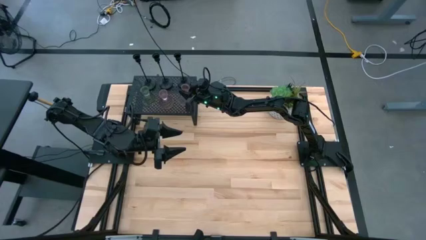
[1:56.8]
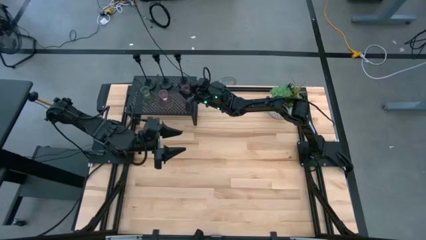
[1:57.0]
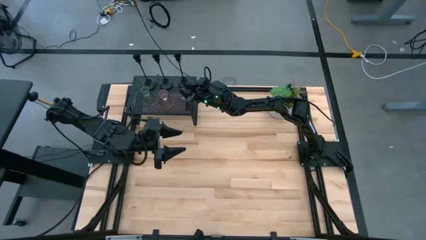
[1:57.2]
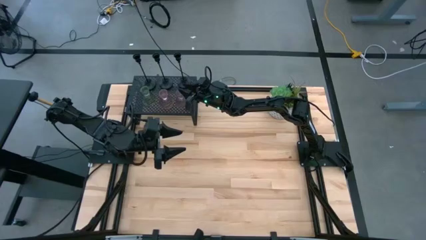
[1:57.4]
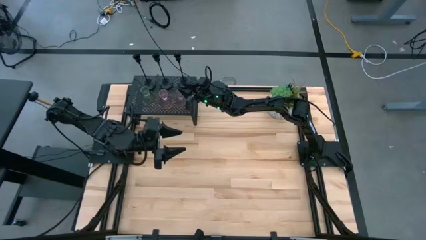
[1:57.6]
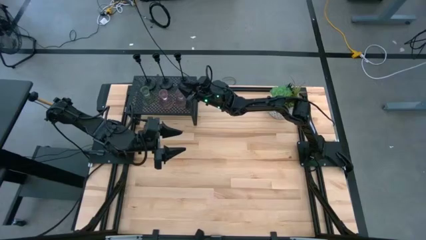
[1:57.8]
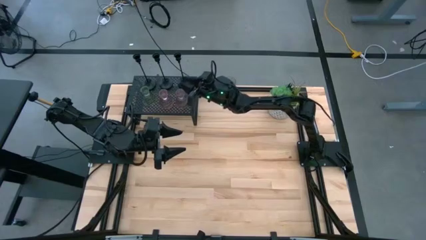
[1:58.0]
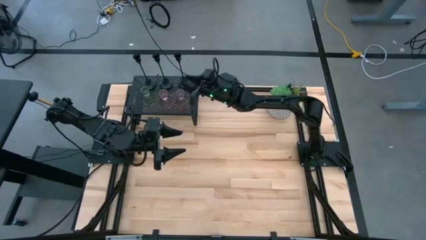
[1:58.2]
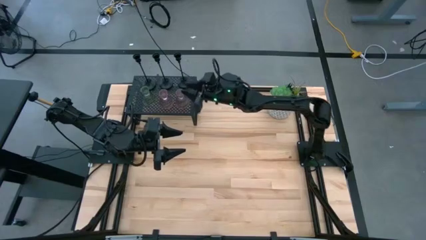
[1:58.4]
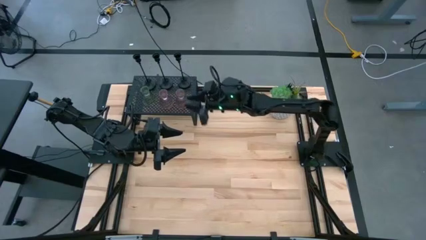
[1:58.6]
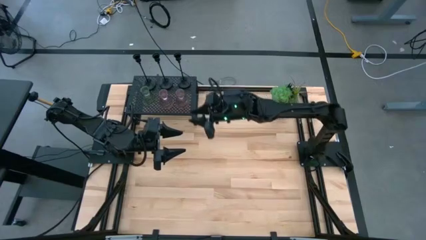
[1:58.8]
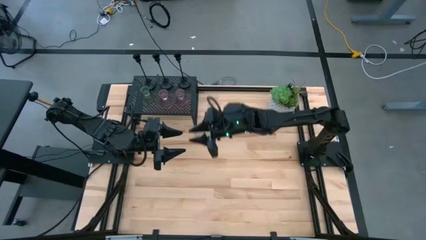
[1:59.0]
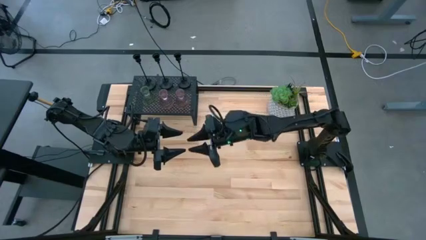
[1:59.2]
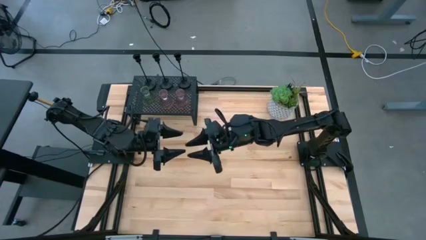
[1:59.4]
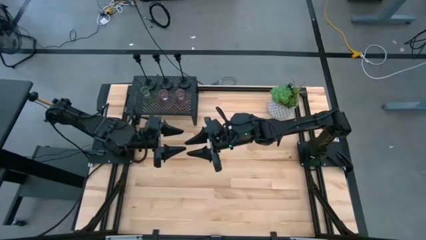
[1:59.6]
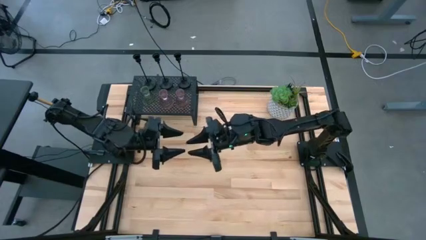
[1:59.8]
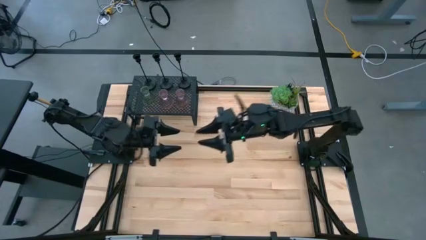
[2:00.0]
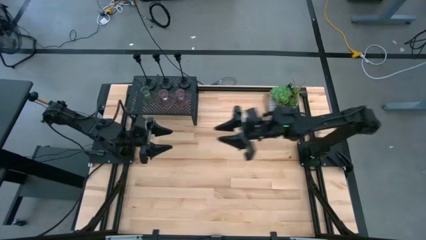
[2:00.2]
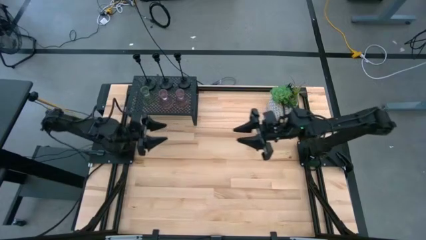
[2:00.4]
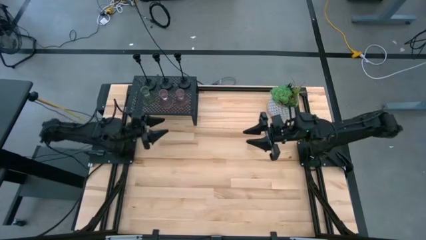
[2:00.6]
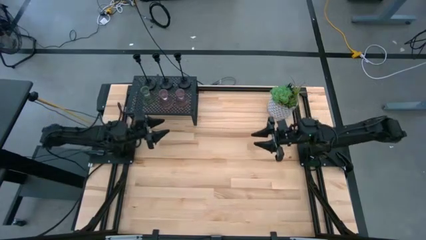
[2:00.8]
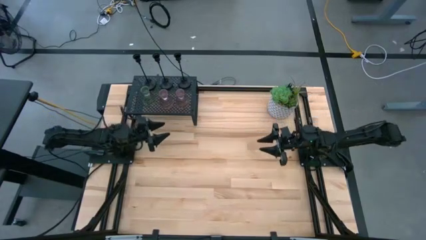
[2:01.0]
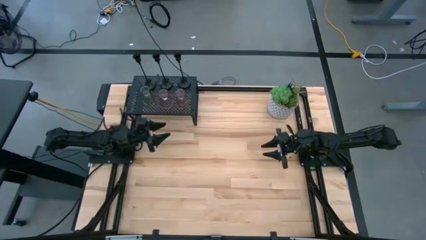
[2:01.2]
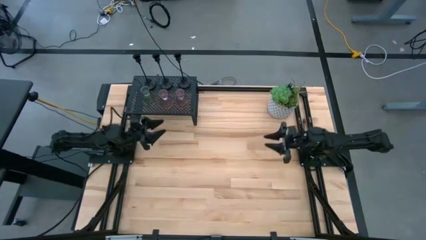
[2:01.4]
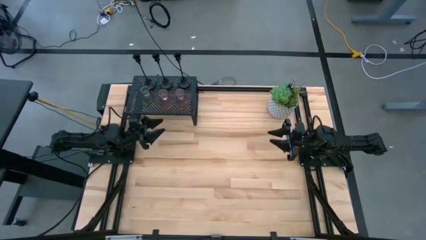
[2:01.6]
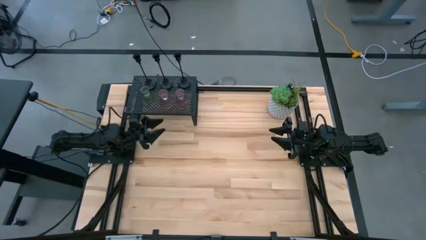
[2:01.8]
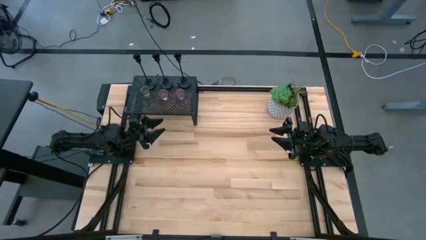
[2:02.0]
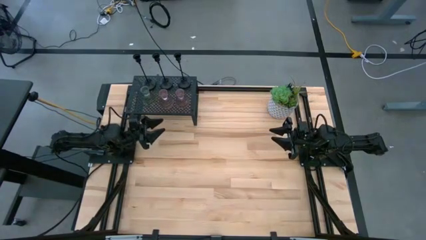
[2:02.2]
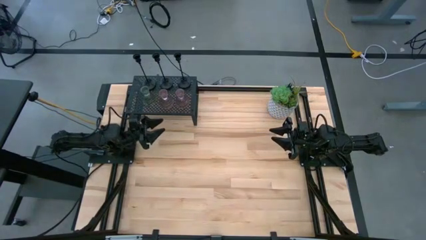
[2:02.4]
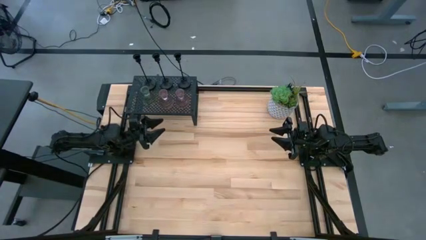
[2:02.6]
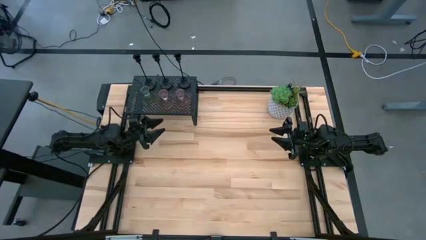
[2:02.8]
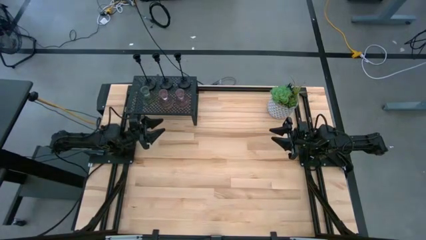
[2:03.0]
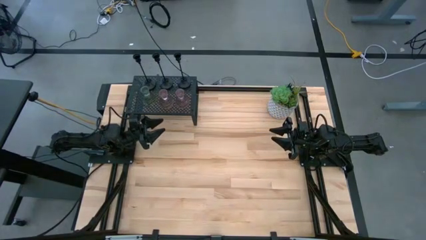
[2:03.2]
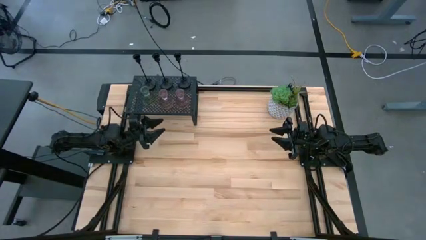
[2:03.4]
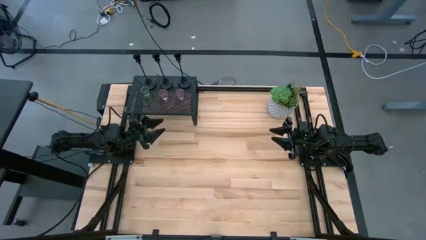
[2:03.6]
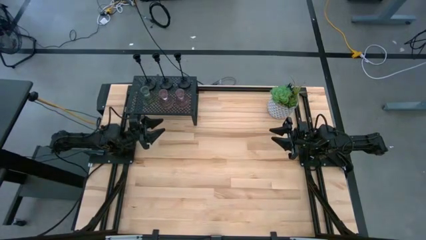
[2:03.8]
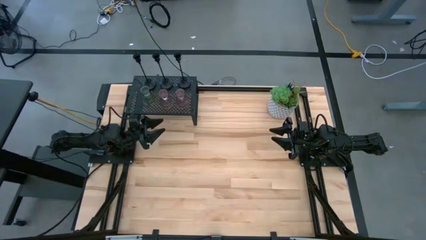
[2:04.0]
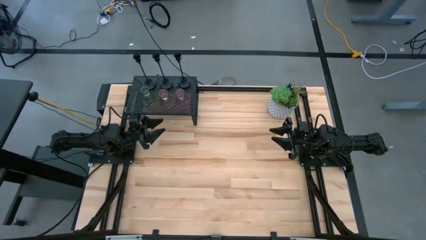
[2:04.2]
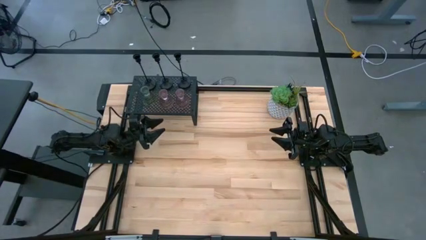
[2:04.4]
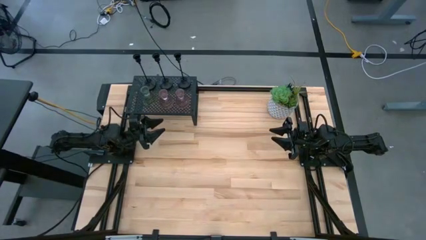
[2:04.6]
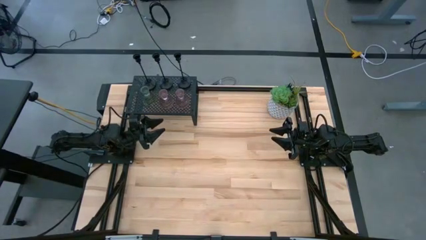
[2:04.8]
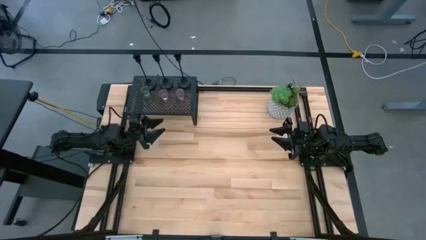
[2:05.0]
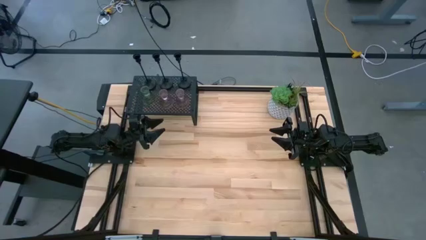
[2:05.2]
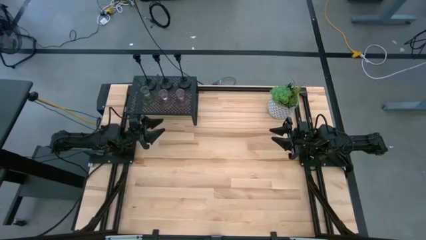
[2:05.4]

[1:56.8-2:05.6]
Task: Pick & Place candle stick holders
Return to Home Position

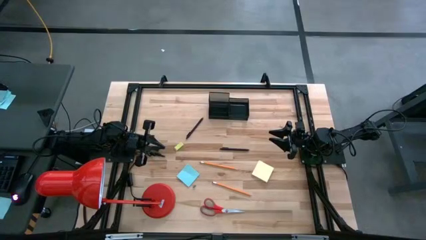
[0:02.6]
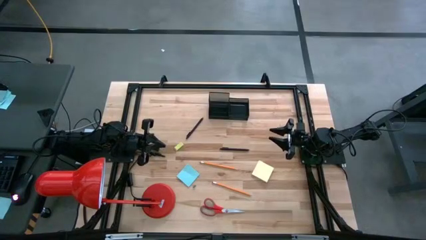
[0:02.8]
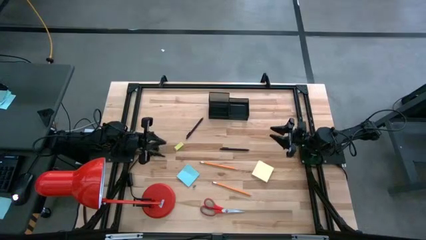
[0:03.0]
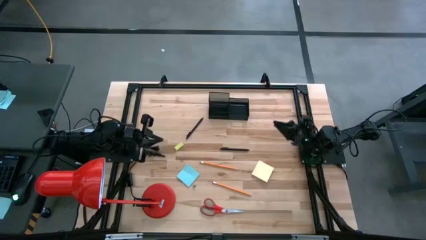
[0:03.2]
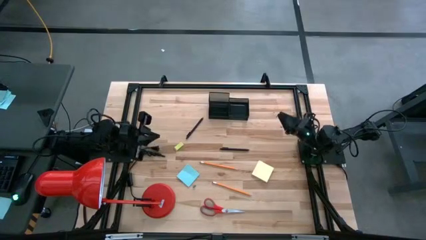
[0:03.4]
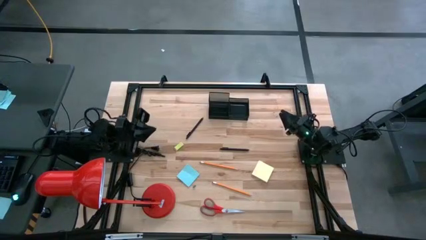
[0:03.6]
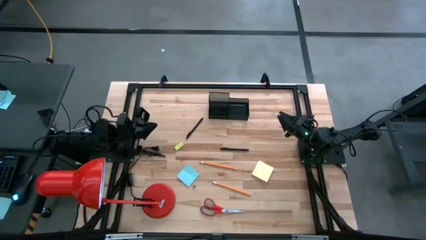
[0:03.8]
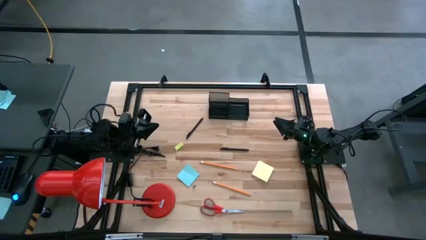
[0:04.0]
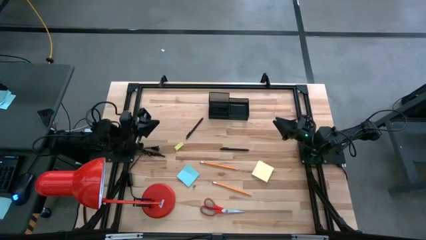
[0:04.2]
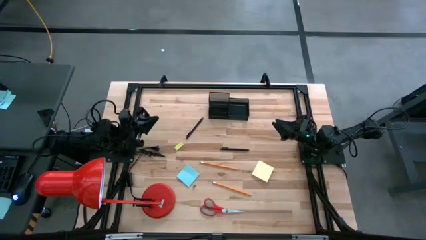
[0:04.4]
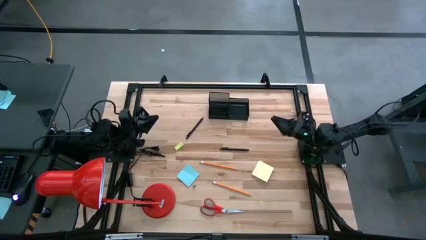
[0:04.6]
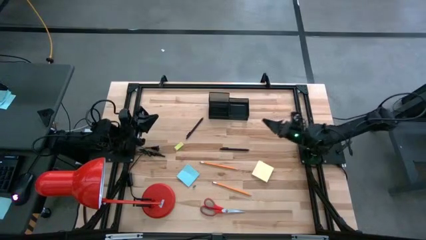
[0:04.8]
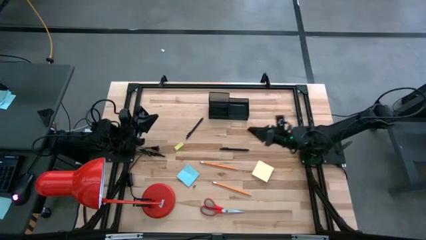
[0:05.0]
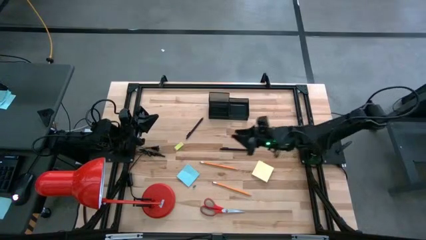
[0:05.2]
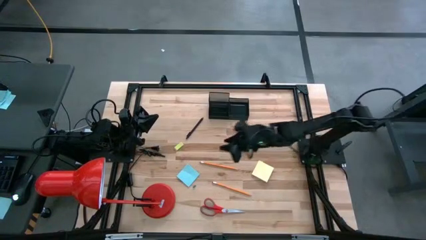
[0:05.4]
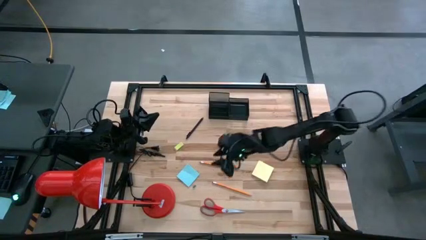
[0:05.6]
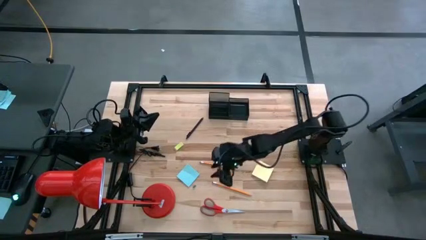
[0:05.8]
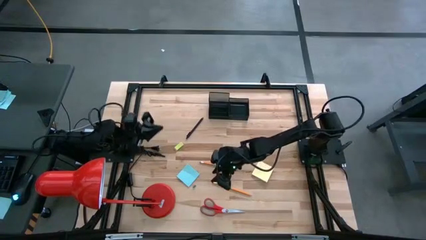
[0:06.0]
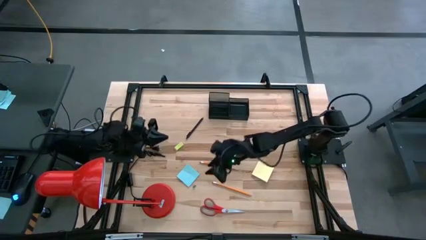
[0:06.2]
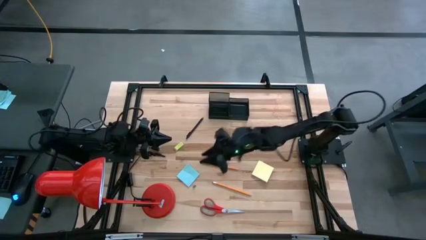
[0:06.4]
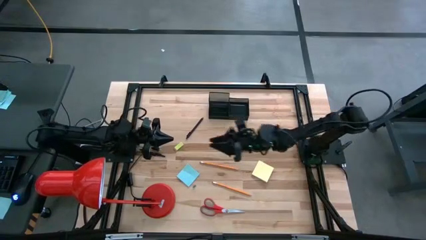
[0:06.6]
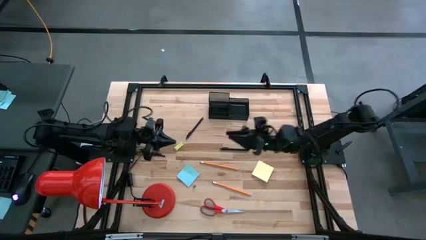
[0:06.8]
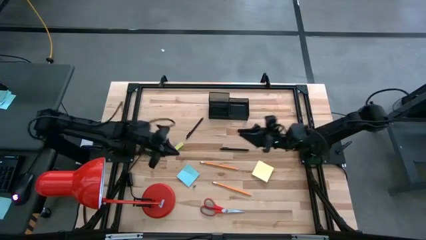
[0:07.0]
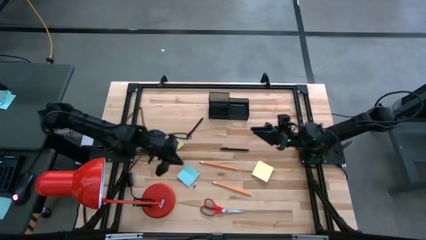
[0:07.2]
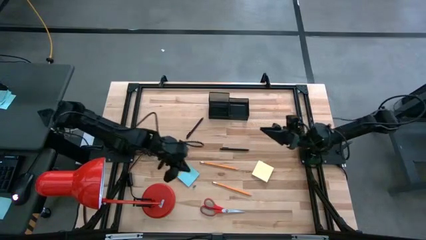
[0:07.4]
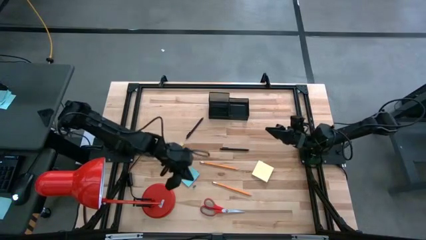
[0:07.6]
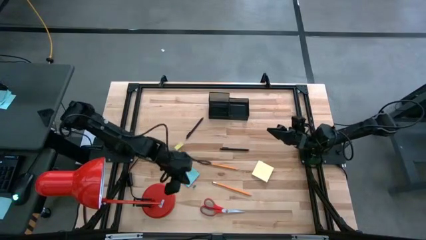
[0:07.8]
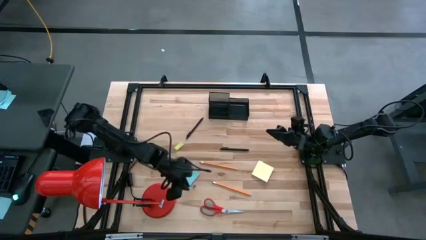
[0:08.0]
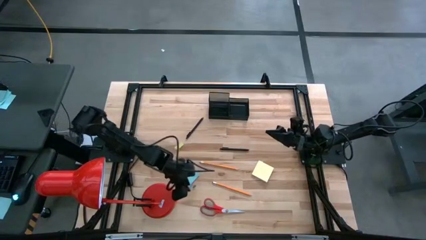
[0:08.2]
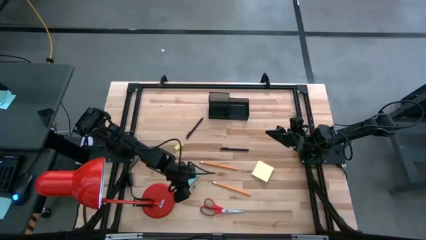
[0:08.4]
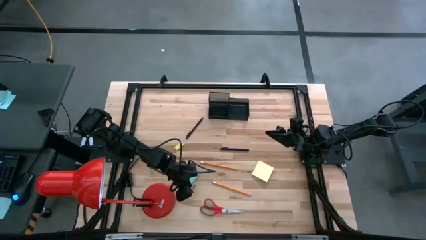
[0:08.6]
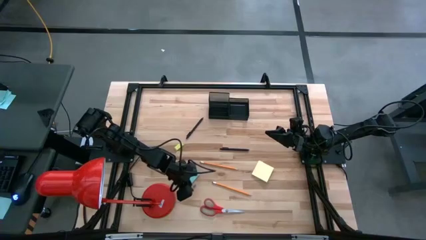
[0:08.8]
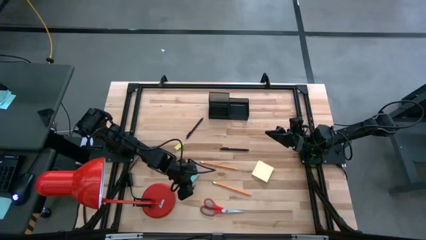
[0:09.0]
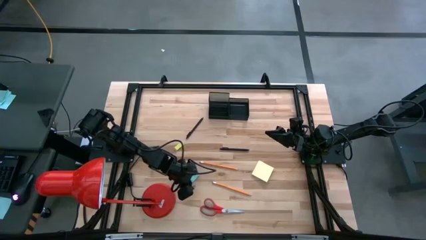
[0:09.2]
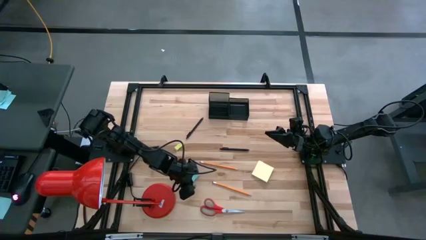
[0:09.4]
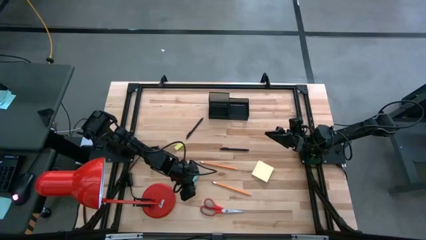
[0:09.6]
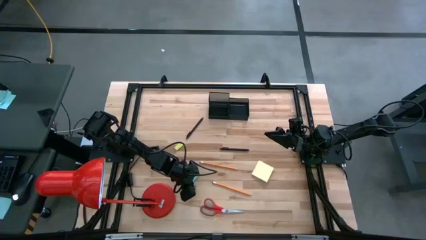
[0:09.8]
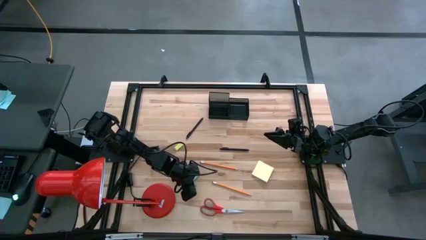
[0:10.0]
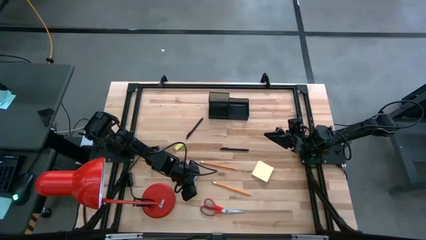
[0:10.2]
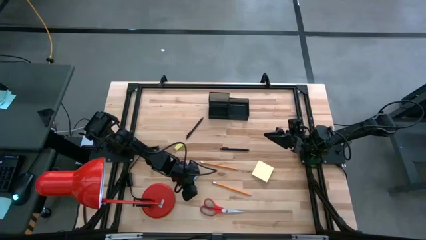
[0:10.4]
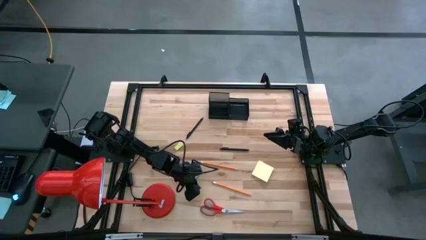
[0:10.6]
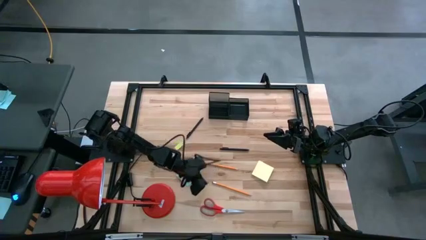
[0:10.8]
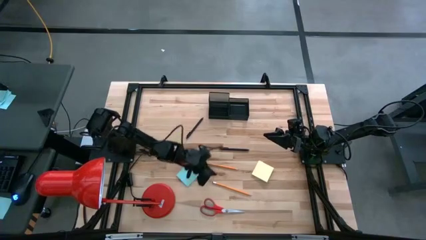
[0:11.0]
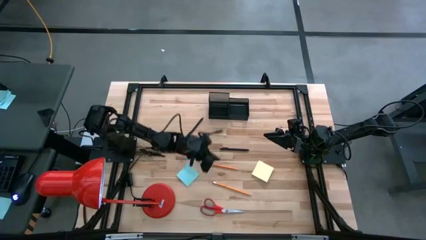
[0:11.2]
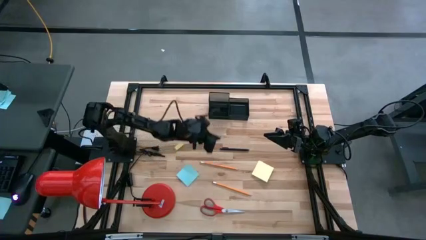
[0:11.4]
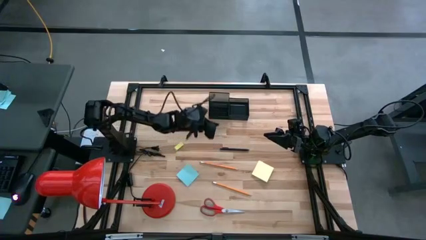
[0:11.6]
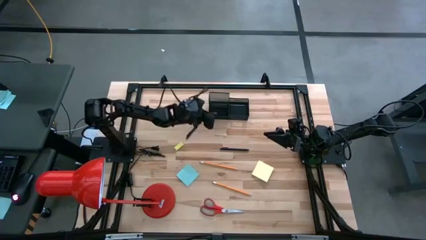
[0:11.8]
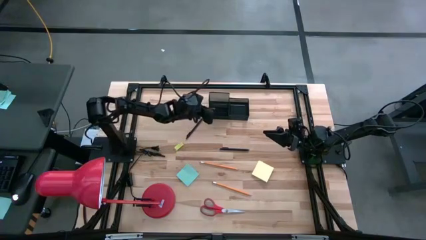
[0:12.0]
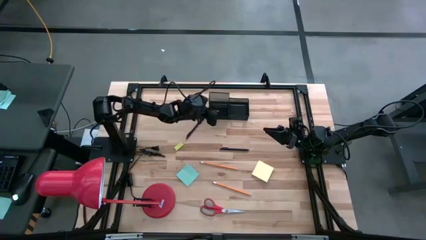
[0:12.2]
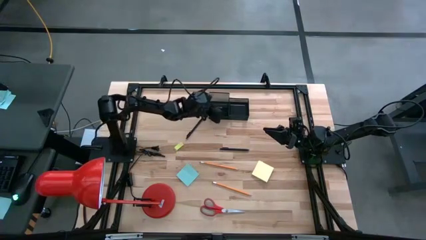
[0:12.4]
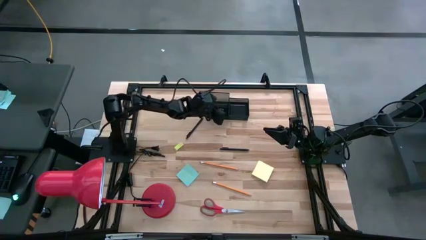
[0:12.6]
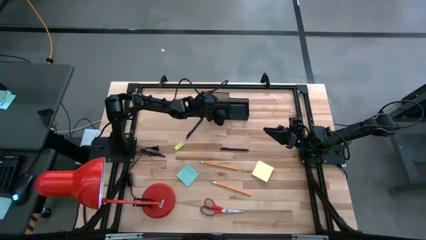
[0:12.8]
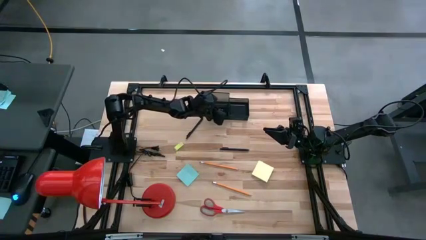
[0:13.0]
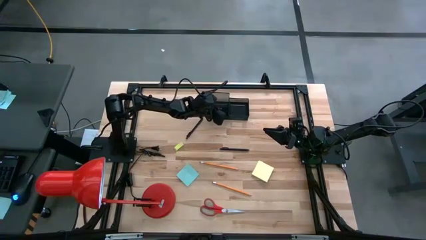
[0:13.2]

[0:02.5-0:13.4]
Task: Pick and place office supplies into organizer
Put the blue binder clip in the black desk organizer
